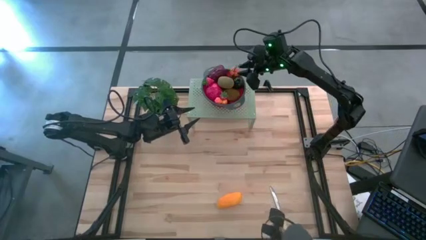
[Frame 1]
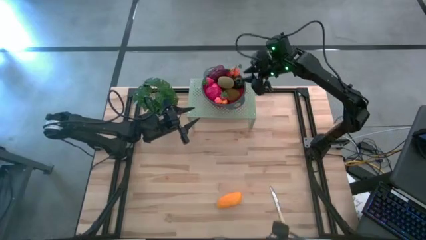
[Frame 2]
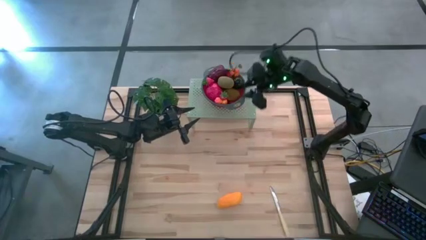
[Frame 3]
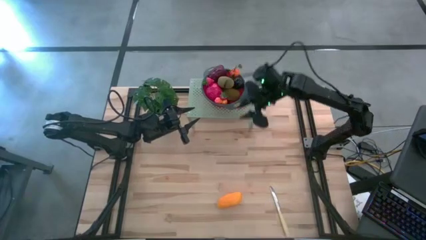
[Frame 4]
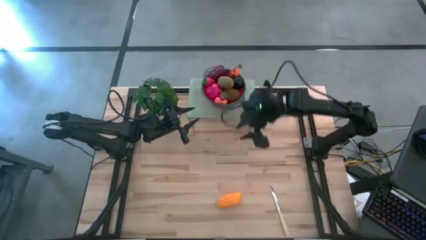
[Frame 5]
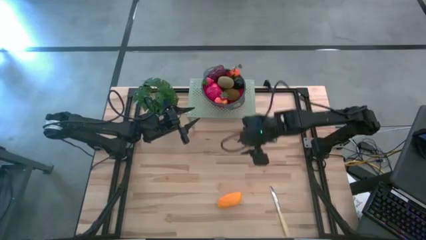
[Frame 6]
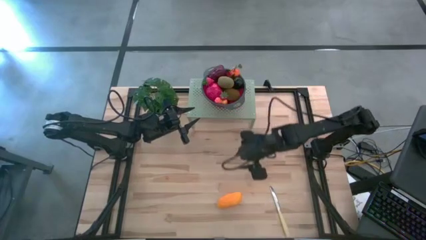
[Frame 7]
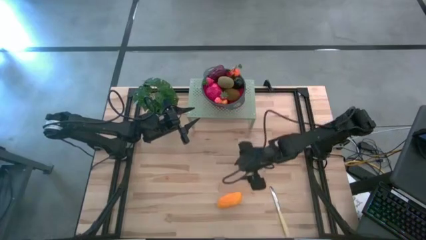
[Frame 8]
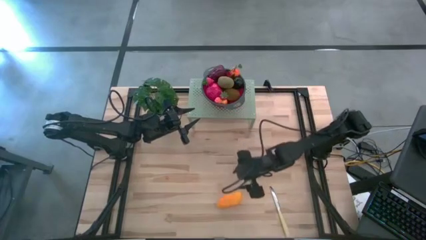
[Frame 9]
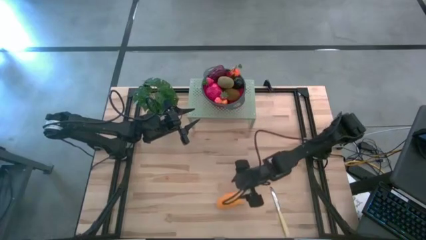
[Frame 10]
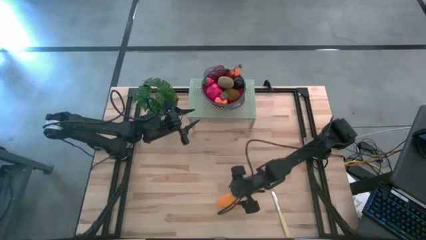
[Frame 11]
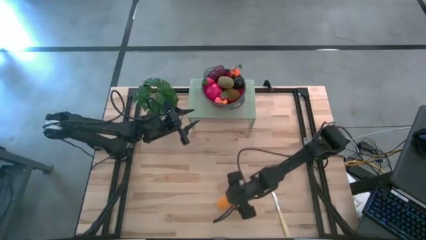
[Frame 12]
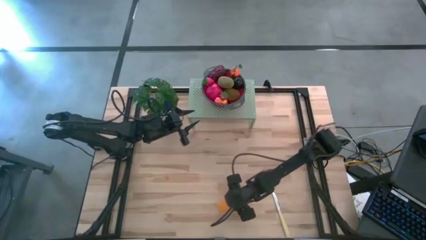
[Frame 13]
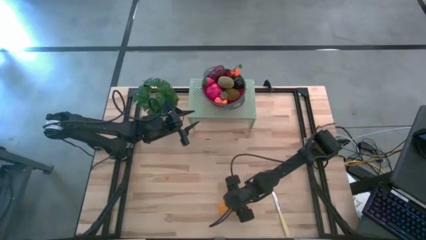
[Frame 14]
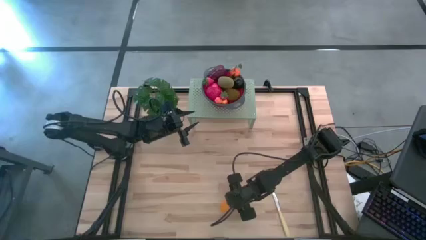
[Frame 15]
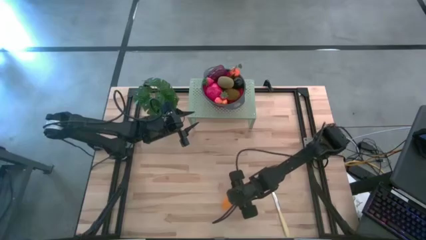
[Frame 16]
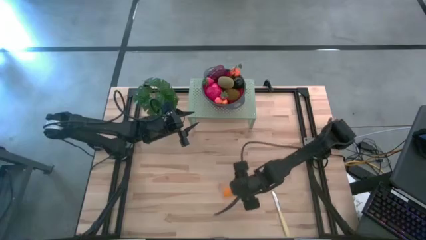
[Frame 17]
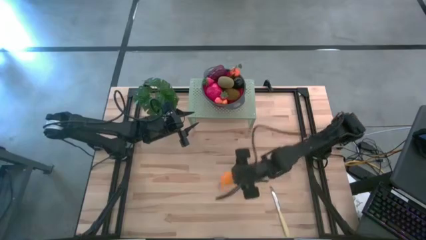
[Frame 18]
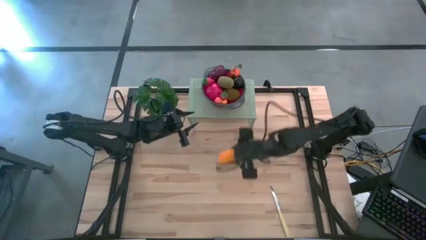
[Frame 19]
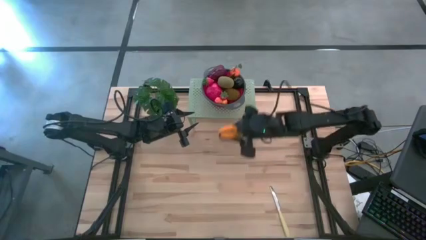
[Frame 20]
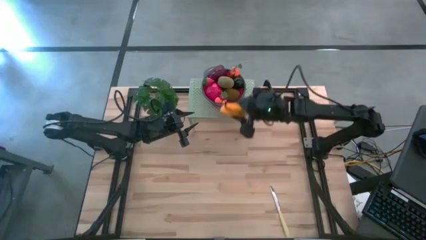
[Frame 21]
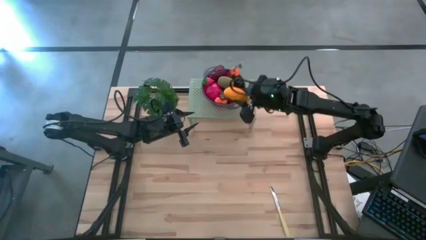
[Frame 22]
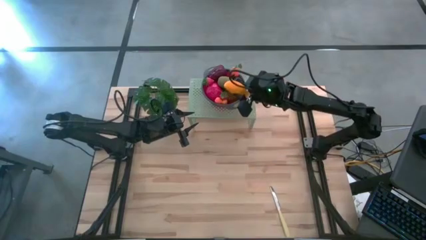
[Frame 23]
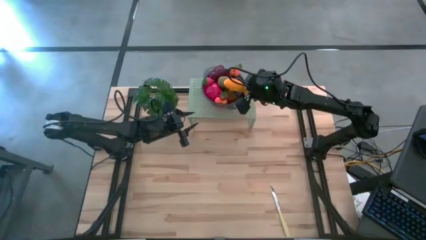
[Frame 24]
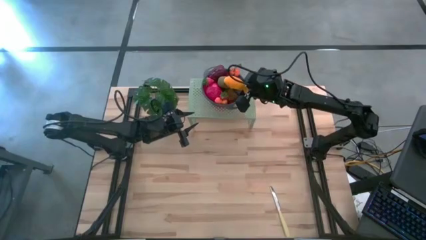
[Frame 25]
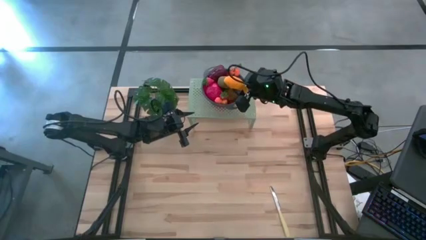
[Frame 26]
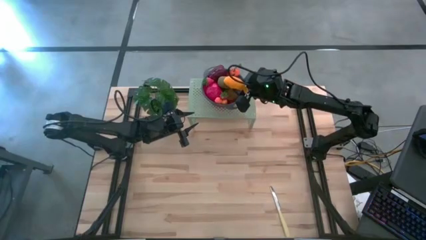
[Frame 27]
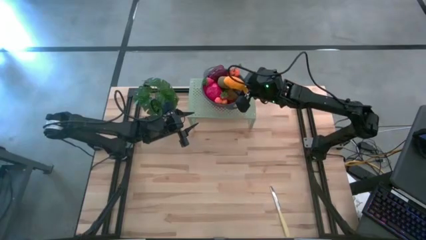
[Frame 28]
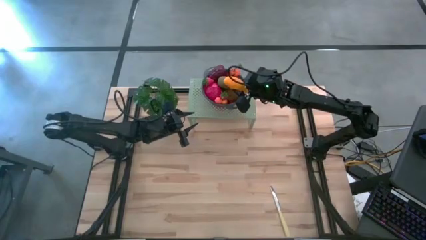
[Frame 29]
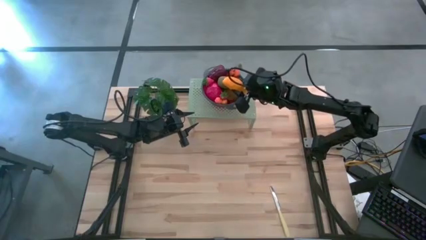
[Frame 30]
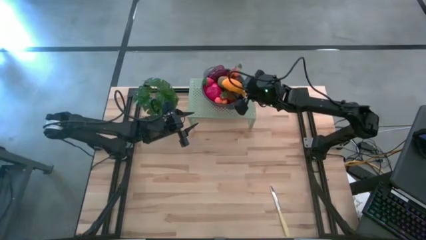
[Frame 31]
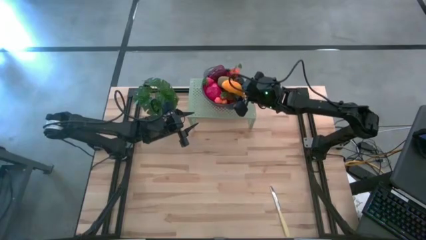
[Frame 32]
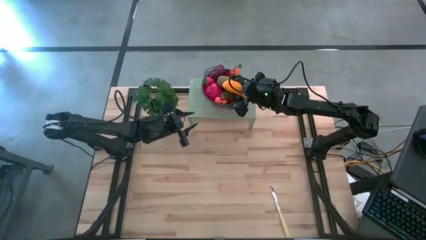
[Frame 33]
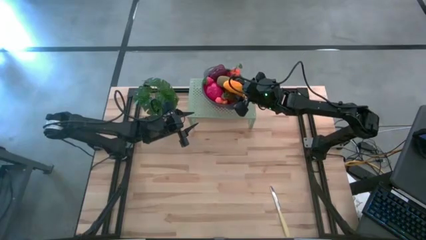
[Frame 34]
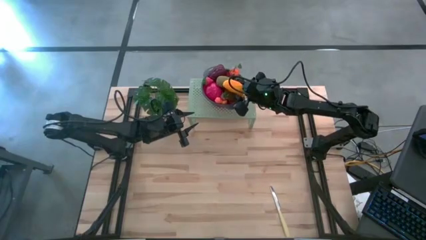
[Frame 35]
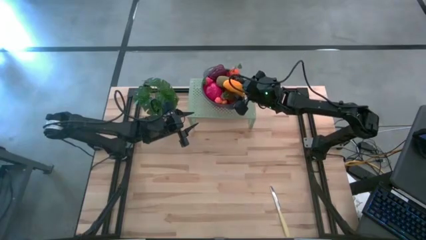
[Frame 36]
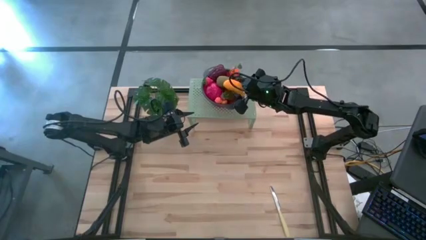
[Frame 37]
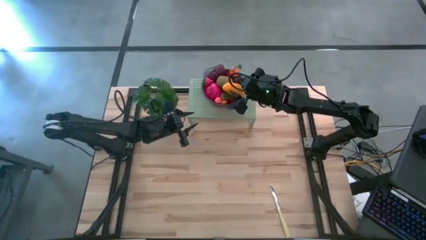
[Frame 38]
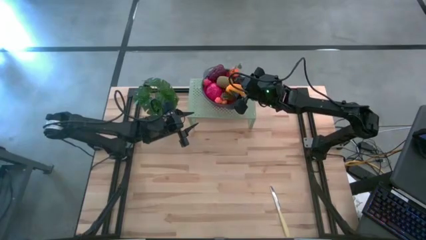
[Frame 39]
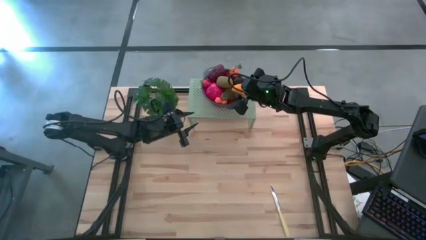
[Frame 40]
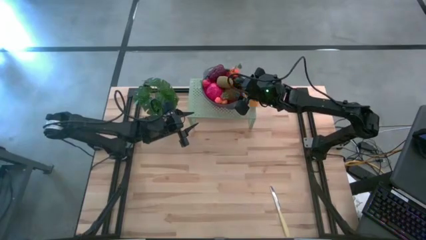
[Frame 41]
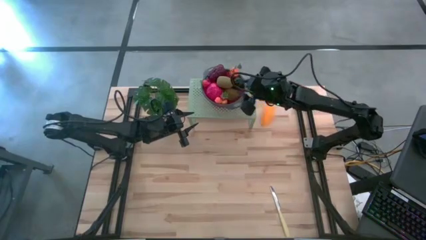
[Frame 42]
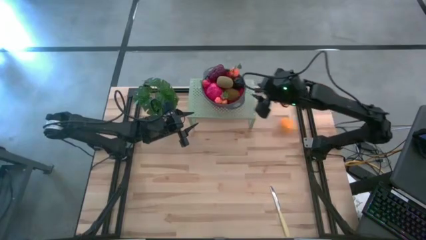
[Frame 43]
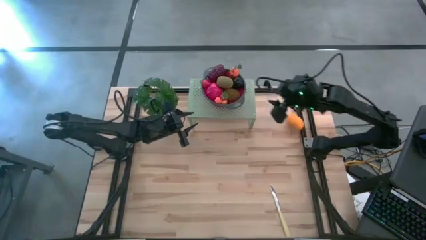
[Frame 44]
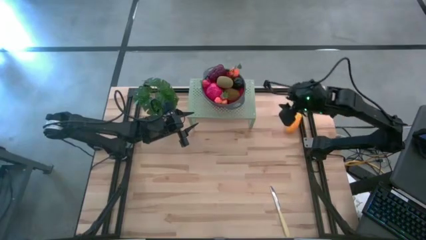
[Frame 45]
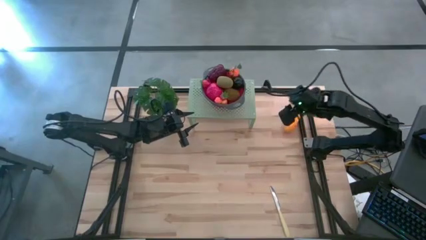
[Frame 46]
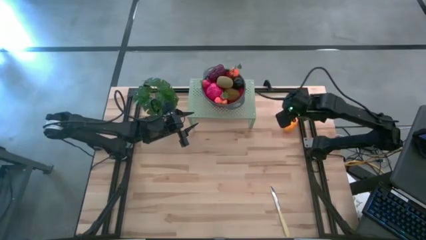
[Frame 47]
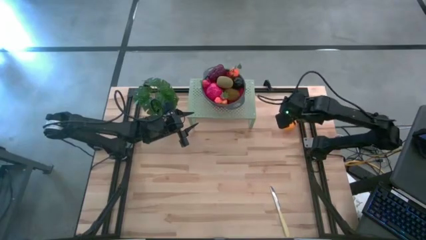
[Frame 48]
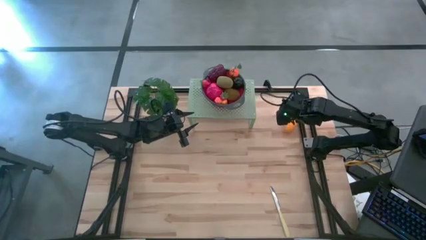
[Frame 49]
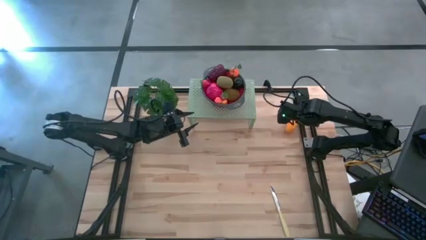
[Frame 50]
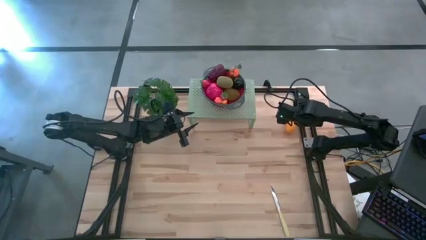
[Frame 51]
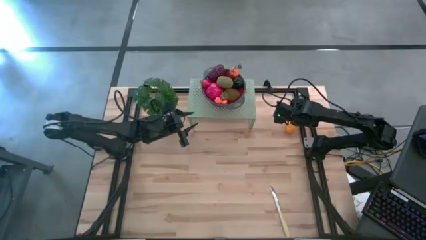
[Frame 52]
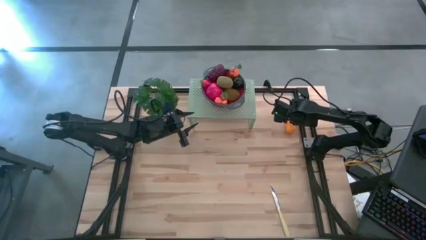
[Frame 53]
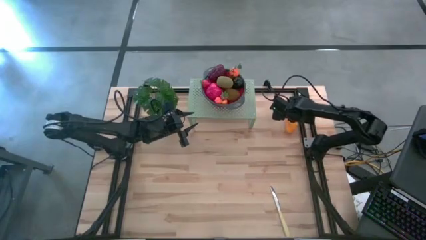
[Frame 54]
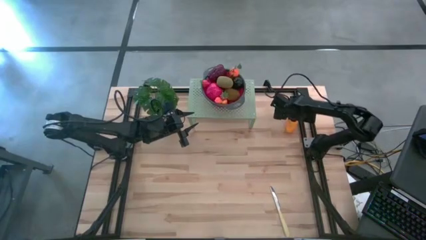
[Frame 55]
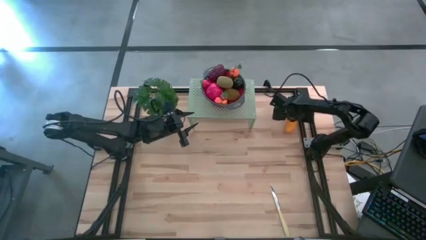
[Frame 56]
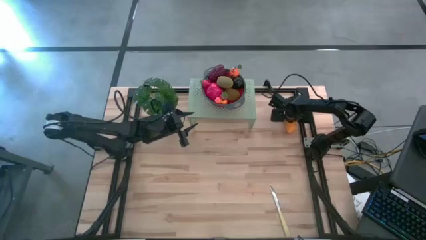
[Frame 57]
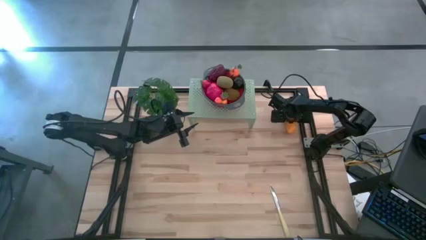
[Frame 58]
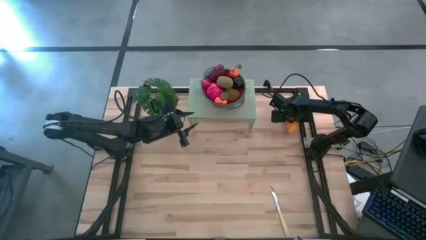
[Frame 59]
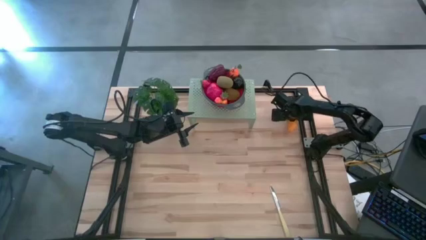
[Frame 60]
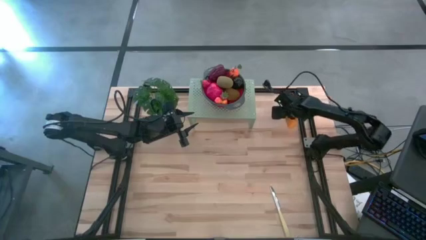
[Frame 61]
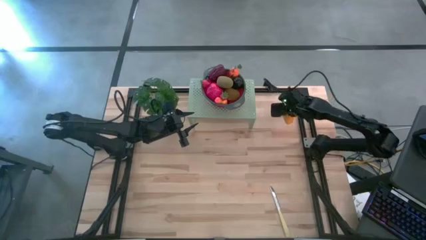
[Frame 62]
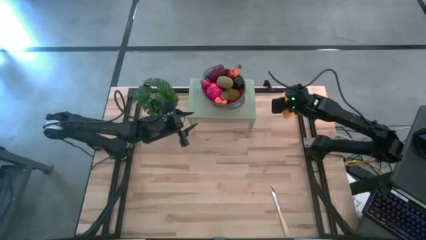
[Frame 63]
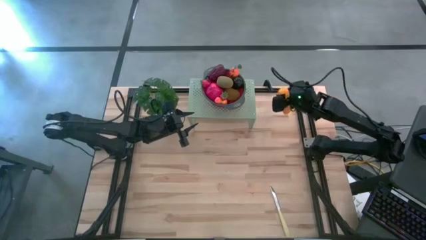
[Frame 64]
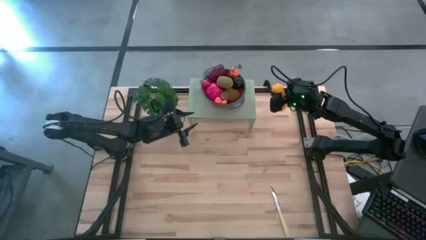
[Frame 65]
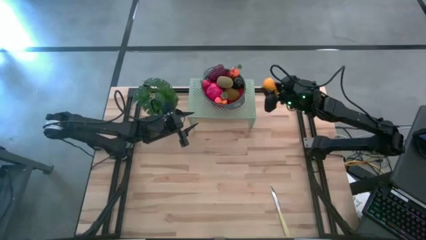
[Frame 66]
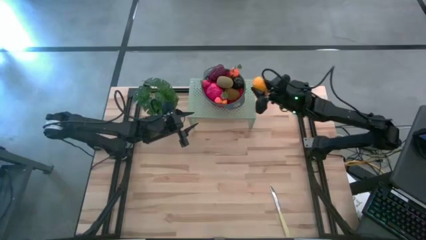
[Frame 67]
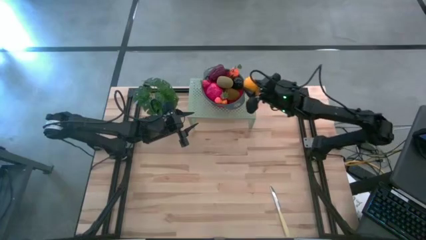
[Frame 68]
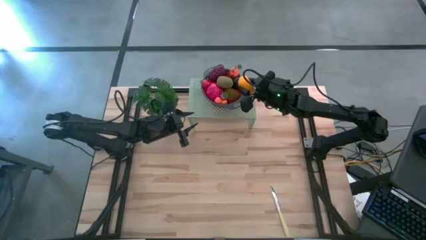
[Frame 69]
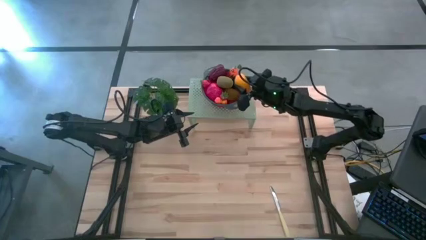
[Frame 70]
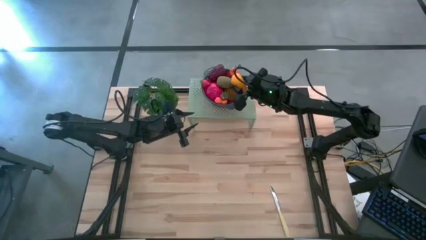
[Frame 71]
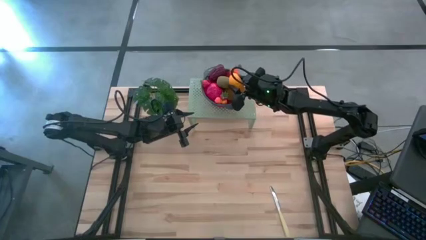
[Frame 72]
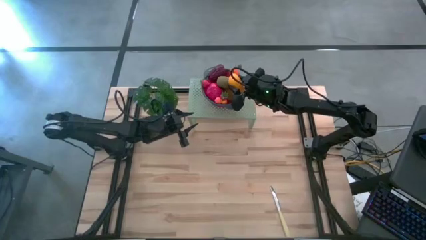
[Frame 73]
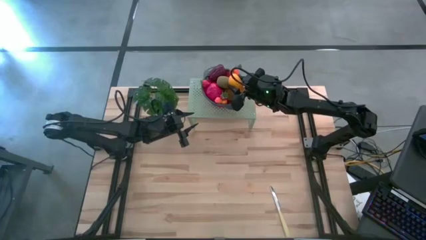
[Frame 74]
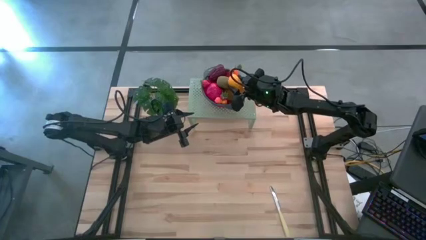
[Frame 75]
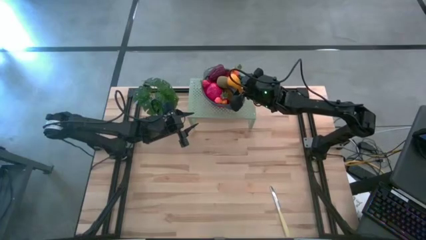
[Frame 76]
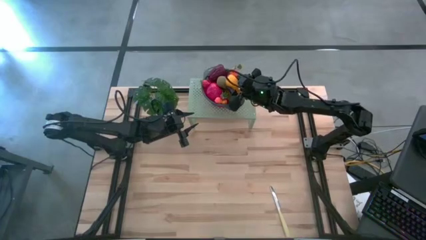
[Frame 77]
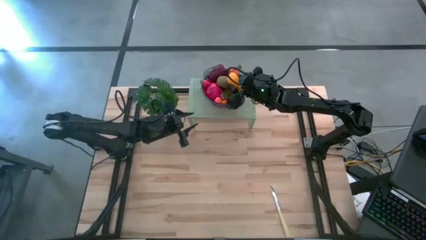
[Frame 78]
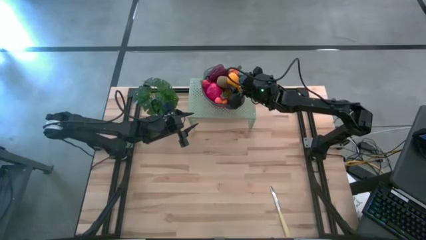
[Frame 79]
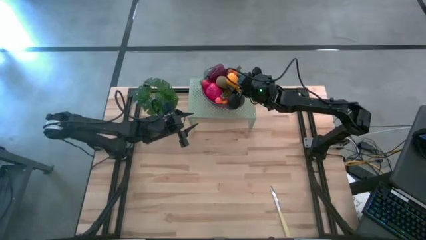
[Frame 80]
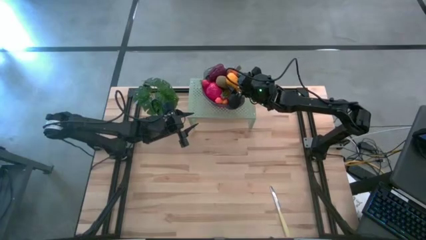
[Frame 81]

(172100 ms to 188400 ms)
Task: Pick & Place Fruit
Put the mango into the red strainer bowl on the shelf

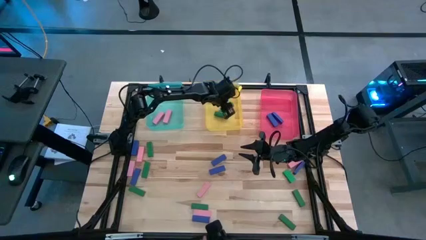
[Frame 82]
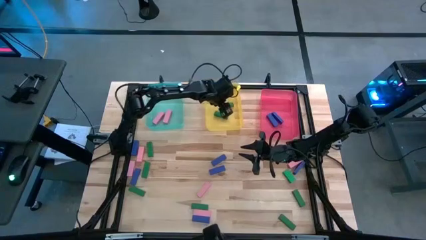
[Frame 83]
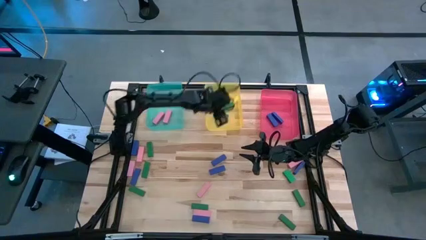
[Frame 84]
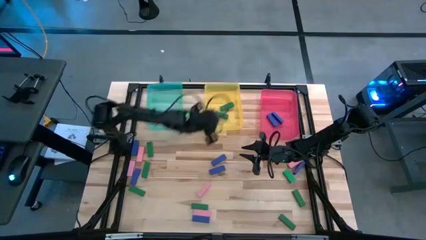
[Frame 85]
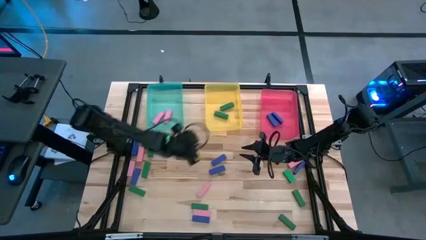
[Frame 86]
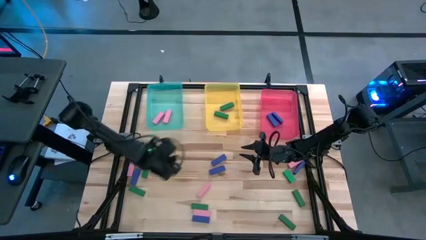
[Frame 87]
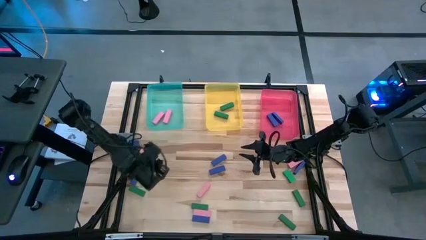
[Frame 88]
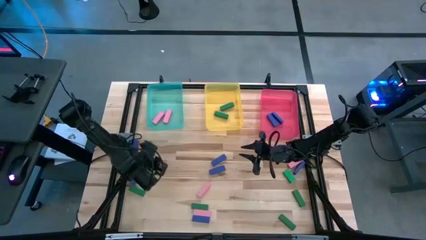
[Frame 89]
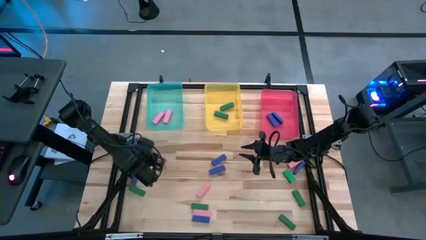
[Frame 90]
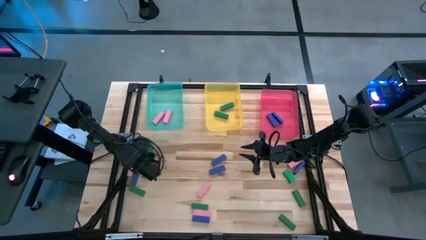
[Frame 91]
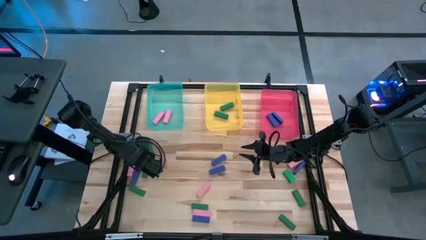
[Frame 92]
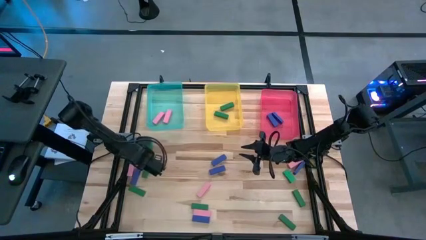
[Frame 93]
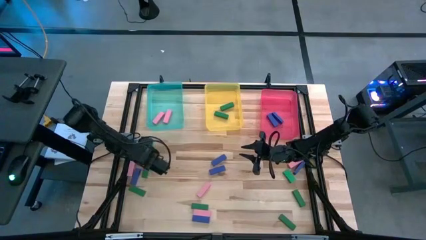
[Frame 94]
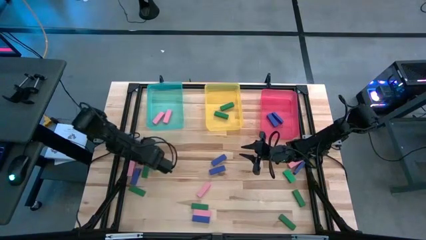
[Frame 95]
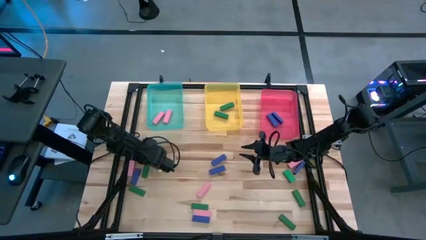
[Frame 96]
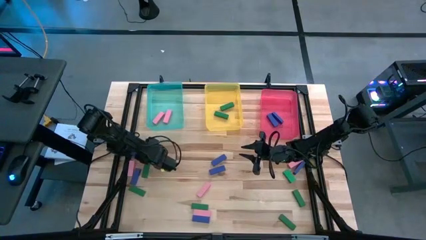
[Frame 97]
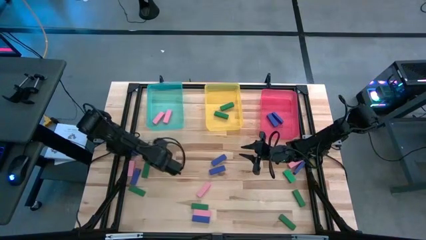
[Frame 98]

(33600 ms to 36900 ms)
Task: Sort blocks
Put the pink wooden block into the blue bin
